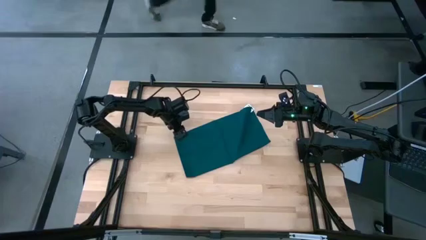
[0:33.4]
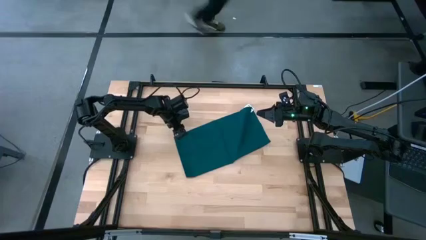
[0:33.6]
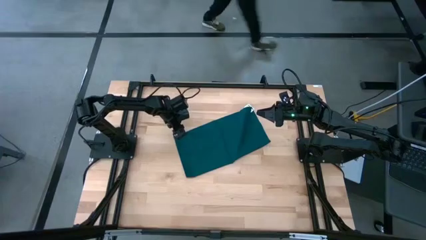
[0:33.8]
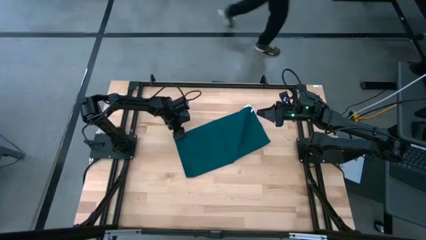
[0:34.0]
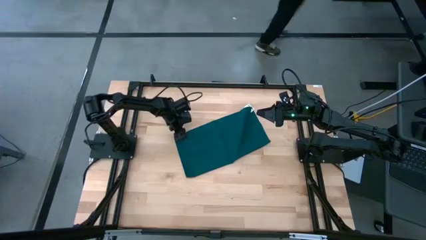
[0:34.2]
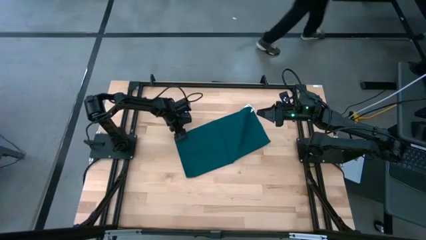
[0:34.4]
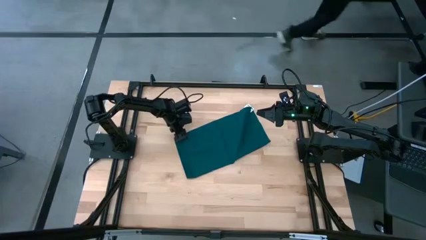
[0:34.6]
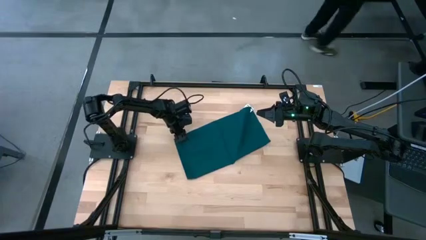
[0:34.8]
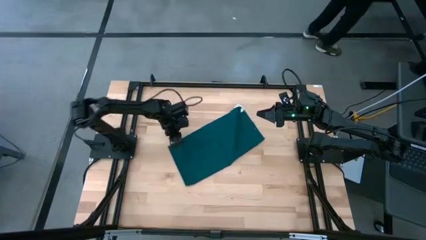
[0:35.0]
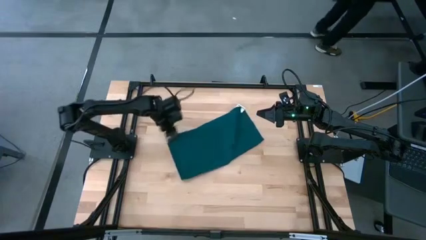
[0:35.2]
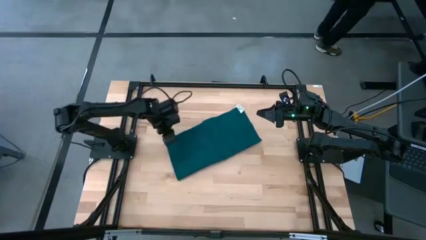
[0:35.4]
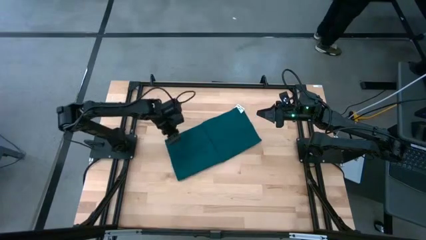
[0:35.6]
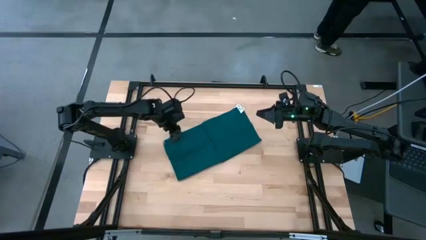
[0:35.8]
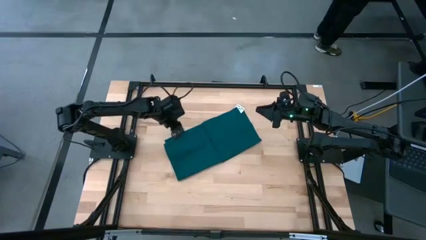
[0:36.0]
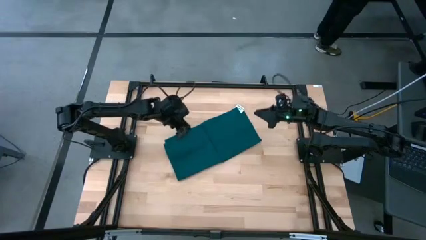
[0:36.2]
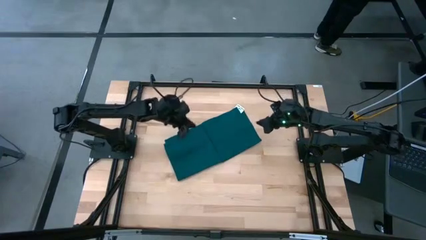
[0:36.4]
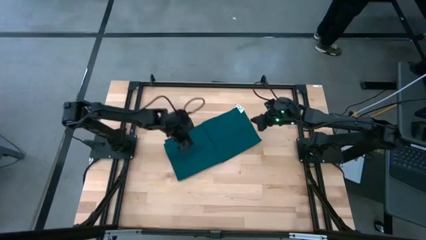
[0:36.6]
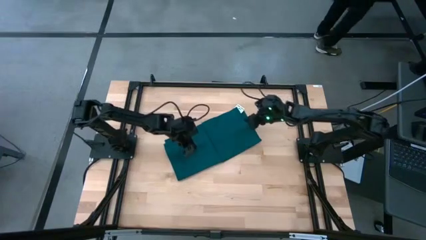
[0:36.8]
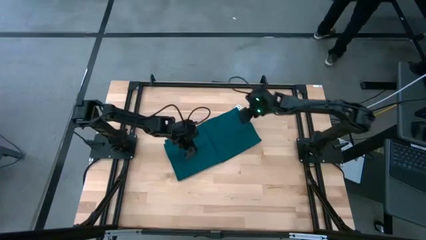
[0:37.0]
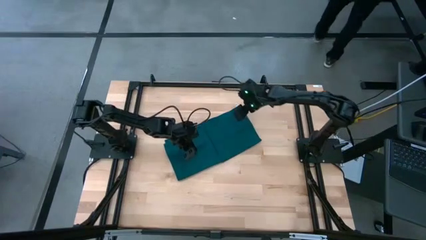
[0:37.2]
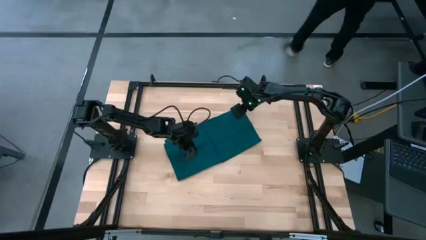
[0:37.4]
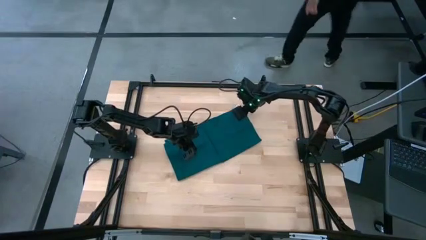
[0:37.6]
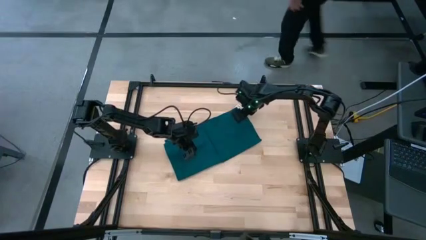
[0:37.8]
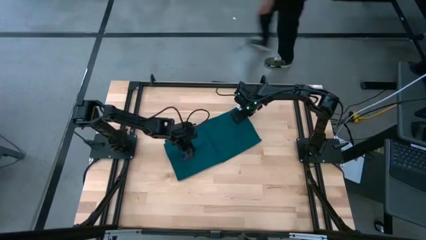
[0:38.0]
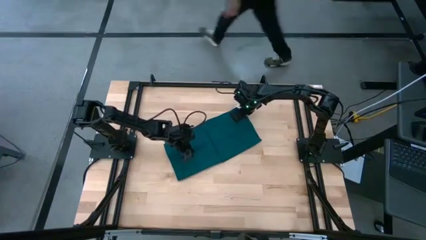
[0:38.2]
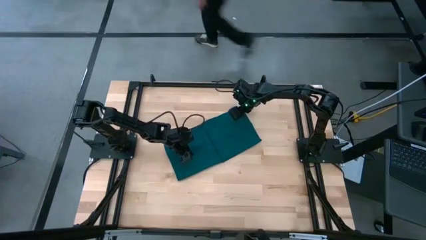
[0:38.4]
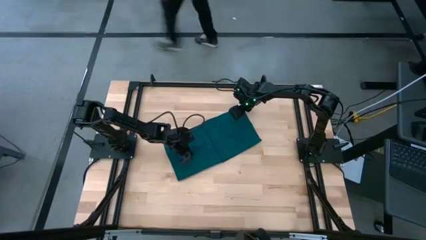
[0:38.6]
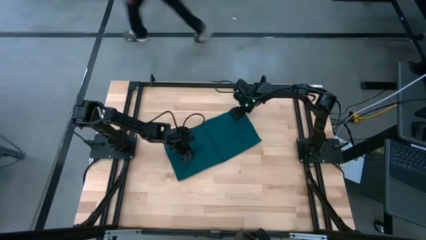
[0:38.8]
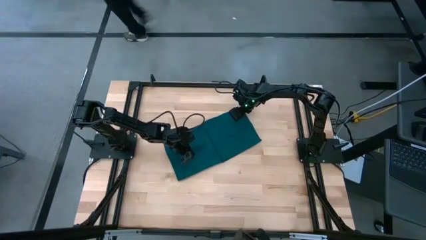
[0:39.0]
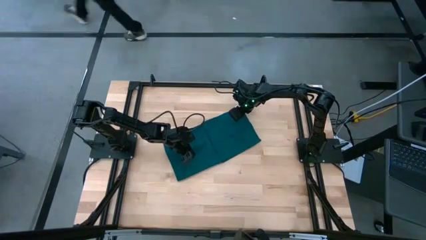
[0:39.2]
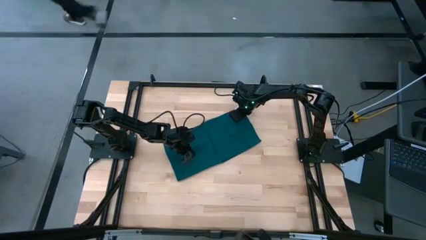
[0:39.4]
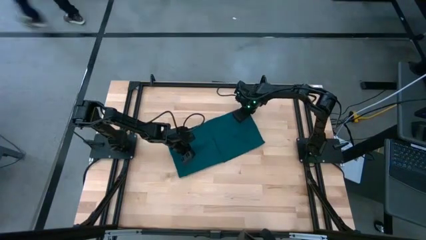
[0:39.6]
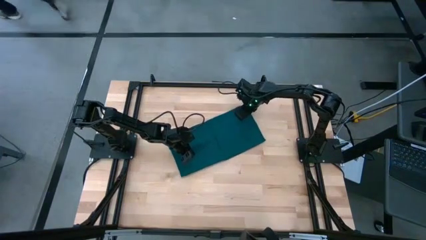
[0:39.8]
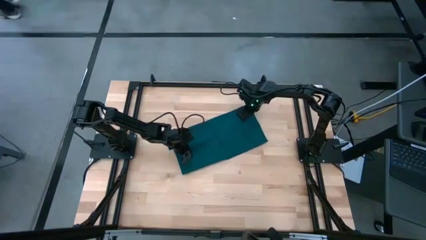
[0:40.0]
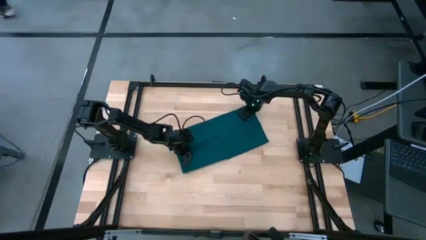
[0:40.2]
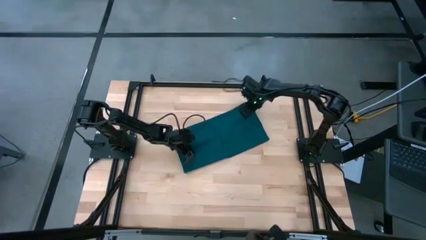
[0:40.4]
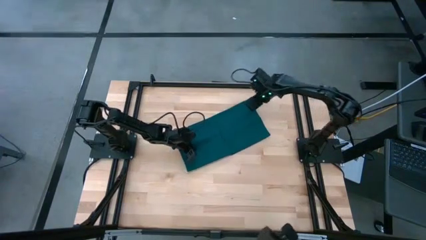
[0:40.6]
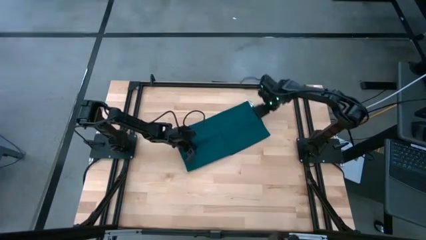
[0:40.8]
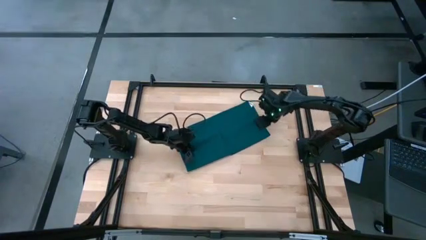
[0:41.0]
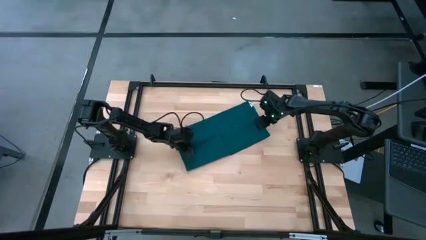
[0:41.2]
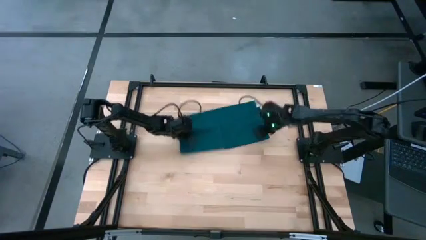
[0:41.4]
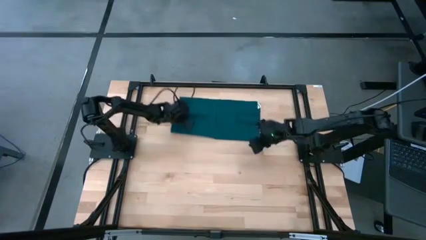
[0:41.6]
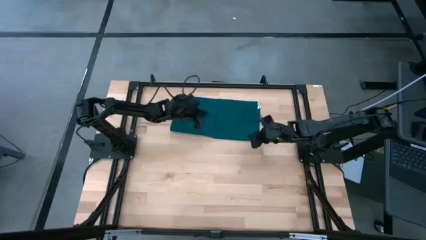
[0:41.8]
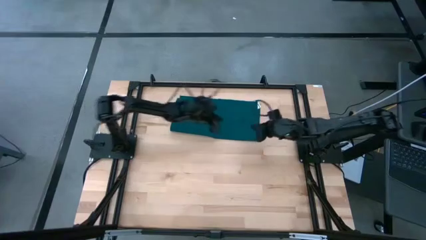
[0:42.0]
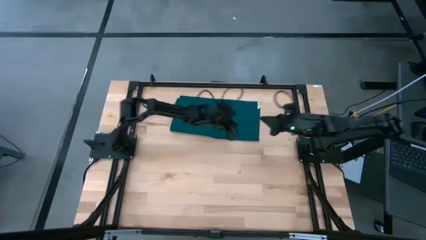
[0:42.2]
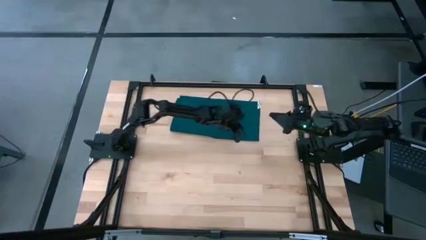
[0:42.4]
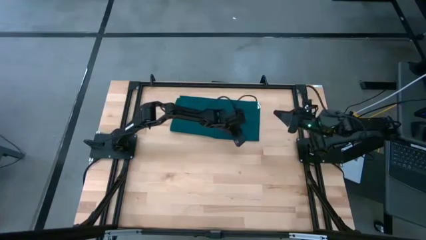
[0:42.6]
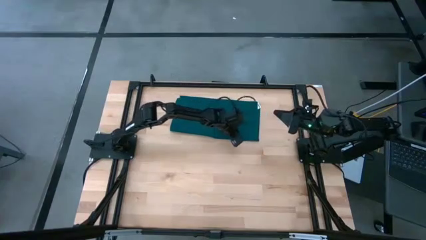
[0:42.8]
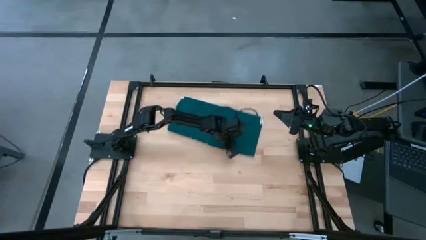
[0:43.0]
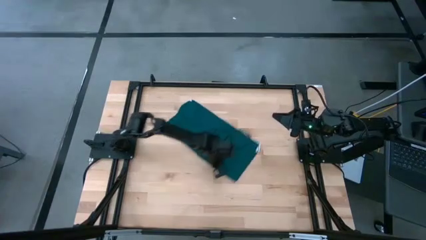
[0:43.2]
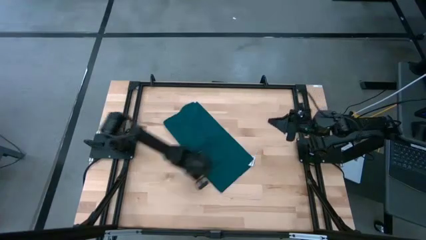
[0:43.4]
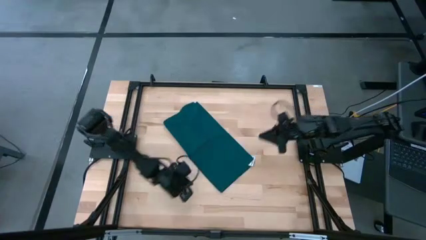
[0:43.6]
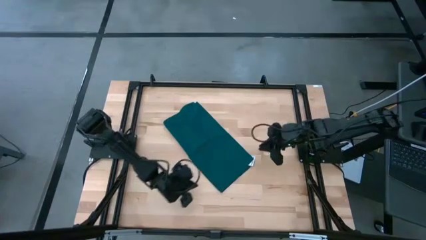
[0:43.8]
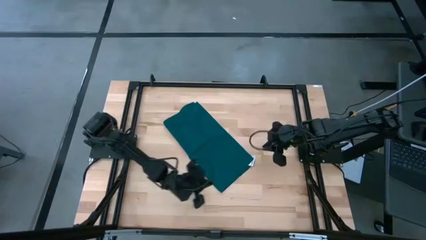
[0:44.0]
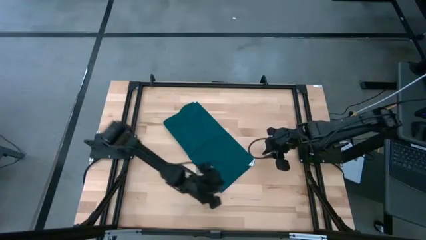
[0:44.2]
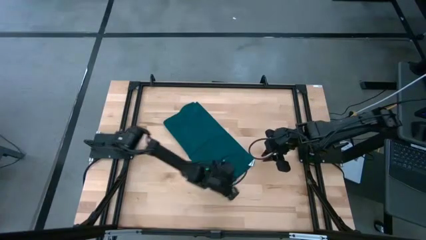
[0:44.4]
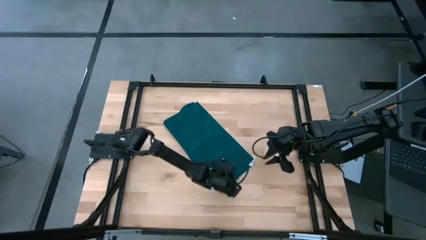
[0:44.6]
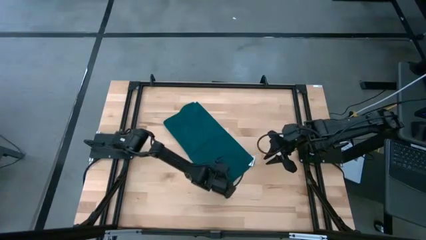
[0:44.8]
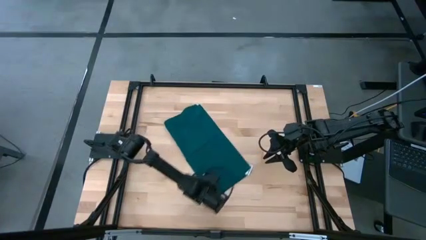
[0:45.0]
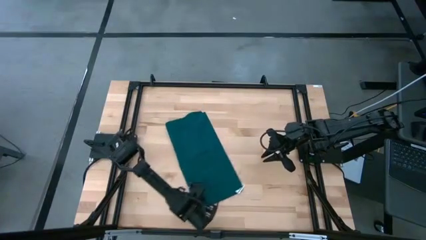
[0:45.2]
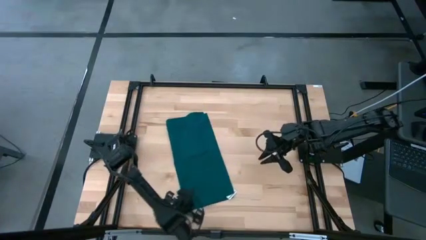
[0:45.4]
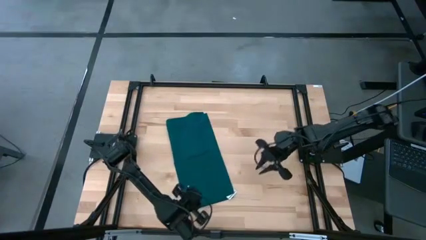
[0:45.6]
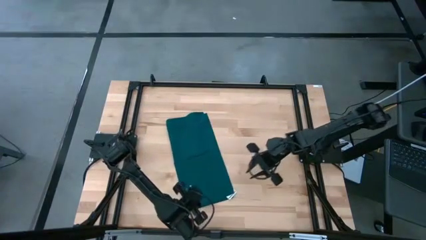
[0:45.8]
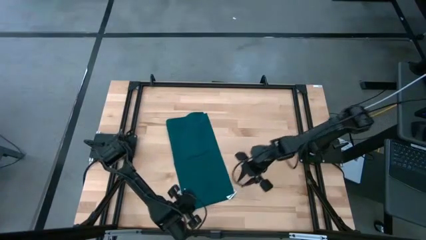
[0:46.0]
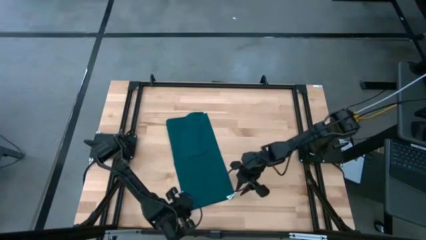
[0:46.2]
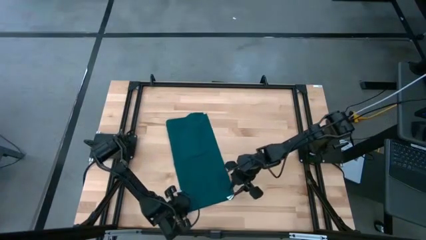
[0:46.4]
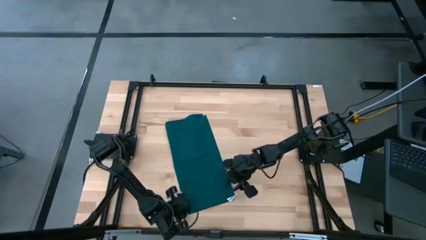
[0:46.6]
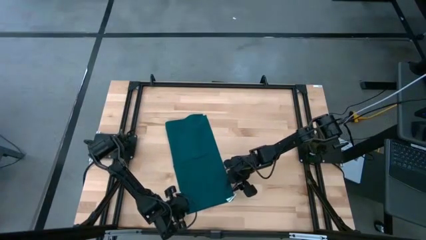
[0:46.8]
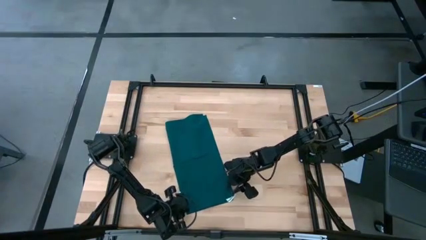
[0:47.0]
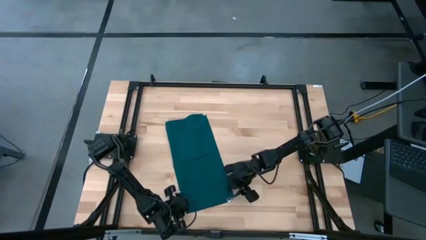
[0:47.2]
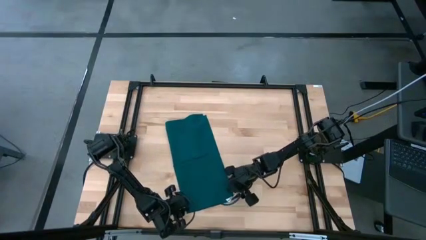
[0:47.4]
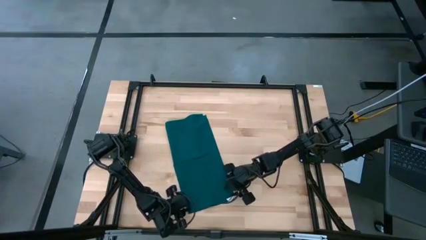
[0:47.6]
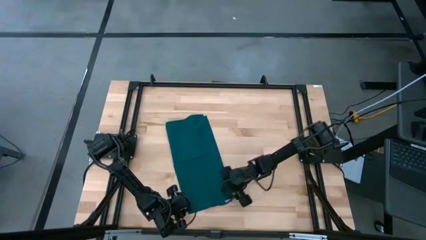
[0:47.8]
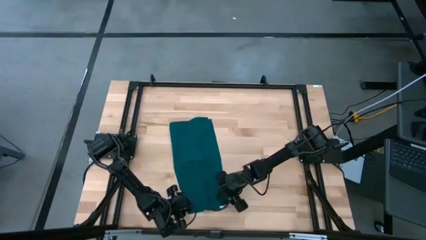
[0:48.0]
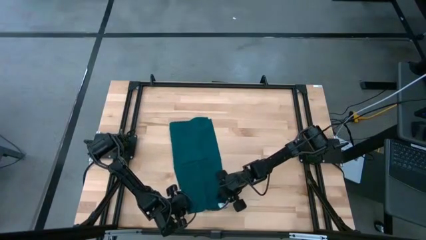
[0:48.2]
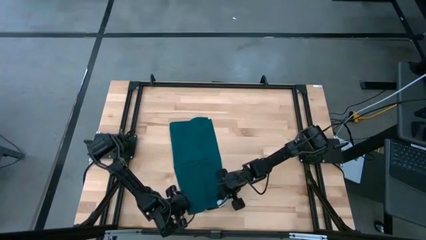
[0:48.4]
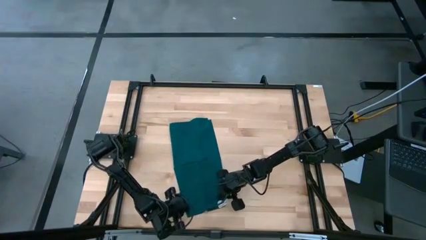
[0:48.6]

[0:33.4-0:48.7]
Task: Fold microfiber towels
Fold the green napkin
